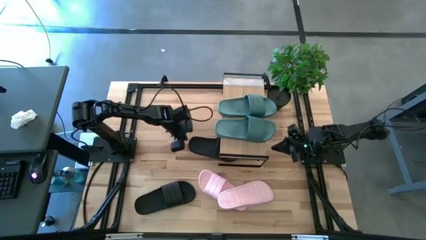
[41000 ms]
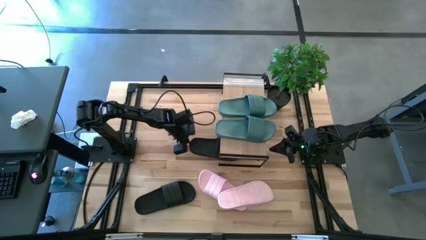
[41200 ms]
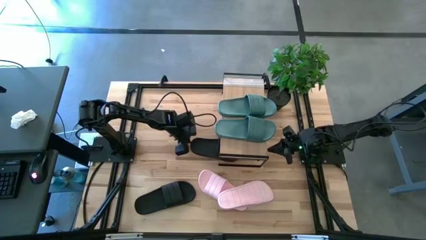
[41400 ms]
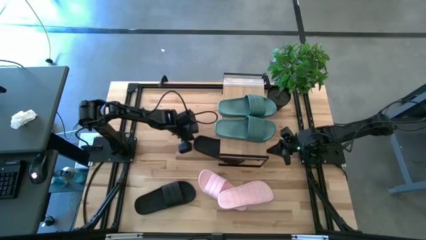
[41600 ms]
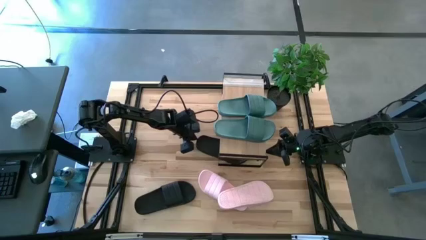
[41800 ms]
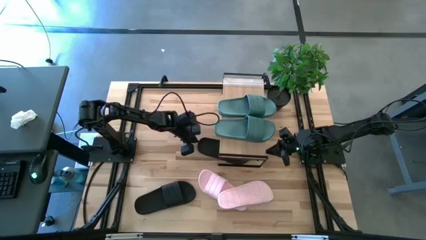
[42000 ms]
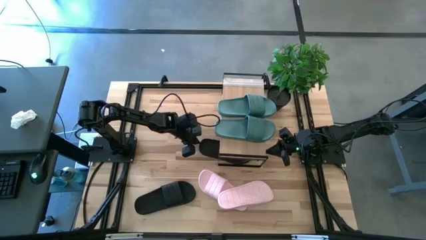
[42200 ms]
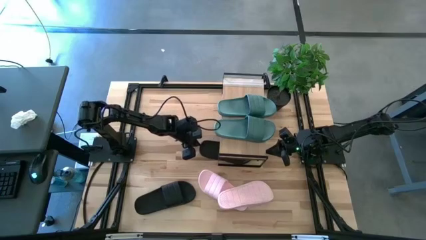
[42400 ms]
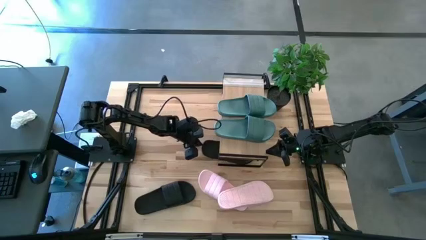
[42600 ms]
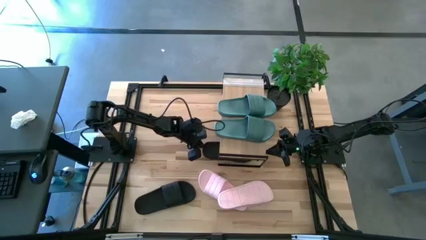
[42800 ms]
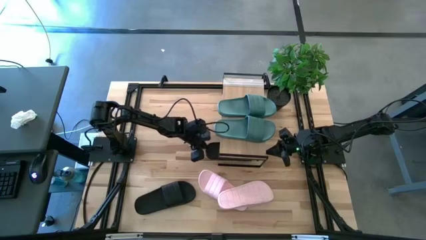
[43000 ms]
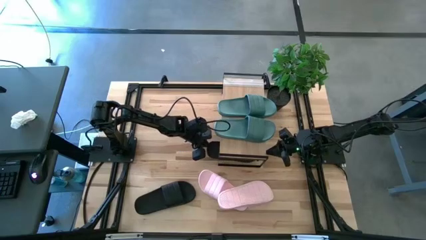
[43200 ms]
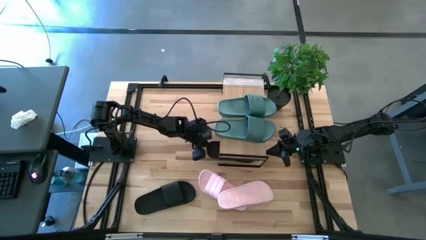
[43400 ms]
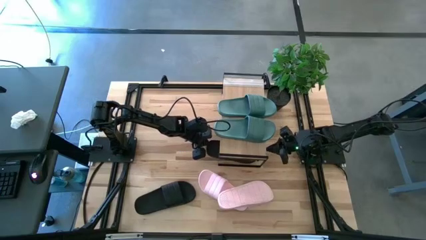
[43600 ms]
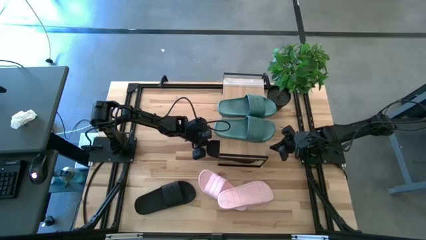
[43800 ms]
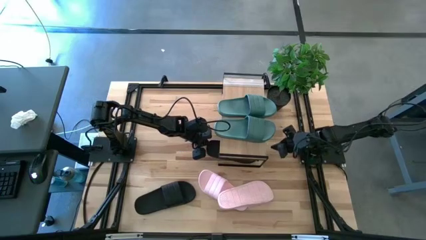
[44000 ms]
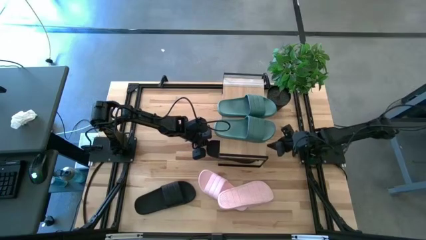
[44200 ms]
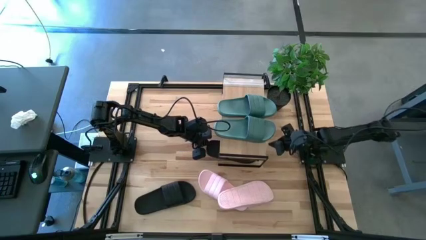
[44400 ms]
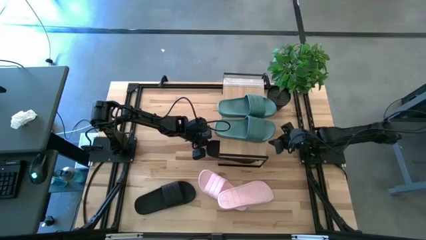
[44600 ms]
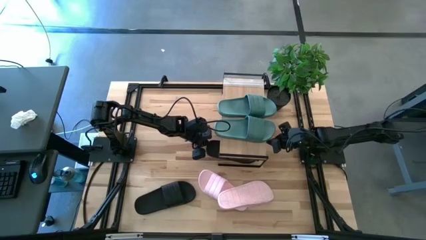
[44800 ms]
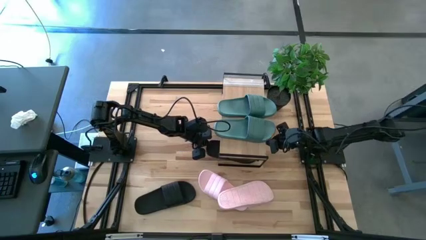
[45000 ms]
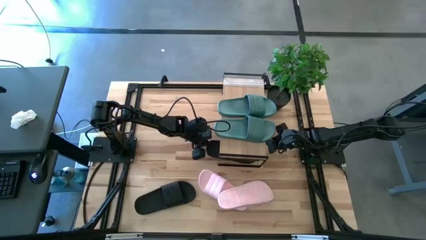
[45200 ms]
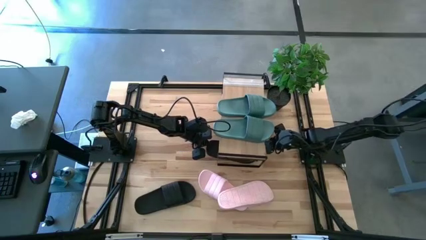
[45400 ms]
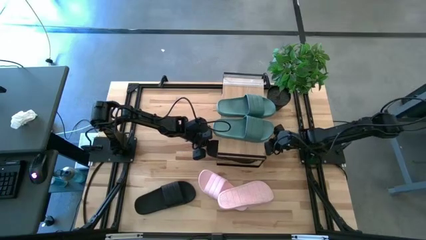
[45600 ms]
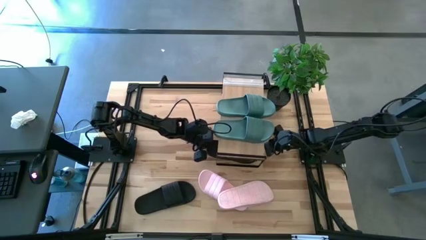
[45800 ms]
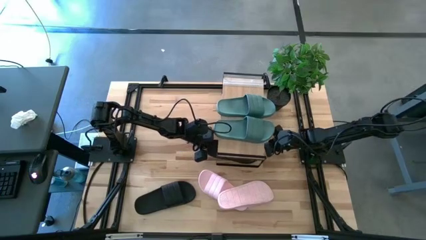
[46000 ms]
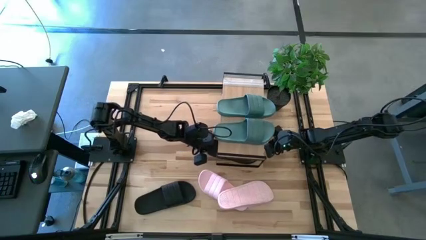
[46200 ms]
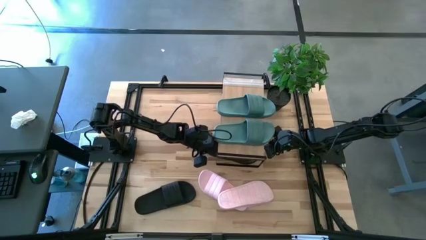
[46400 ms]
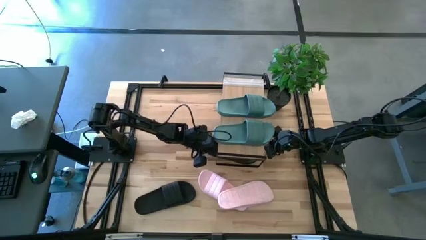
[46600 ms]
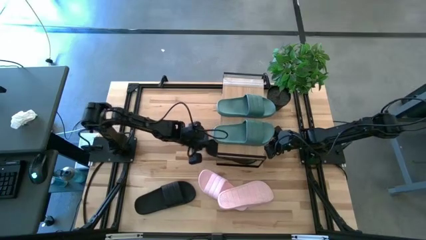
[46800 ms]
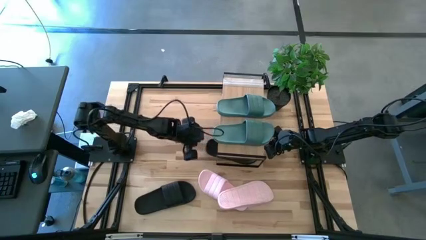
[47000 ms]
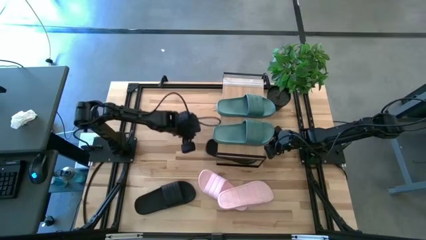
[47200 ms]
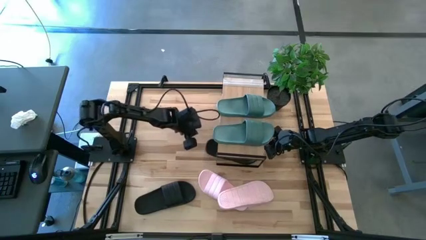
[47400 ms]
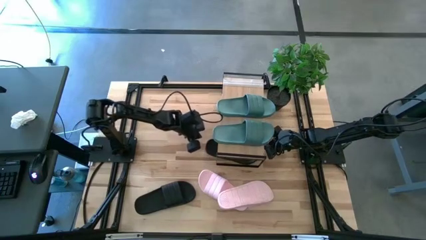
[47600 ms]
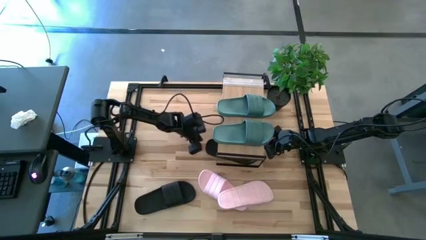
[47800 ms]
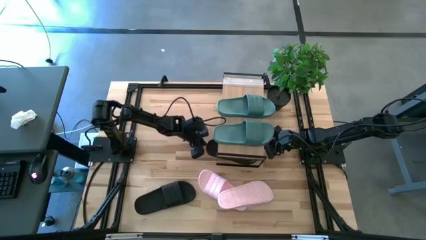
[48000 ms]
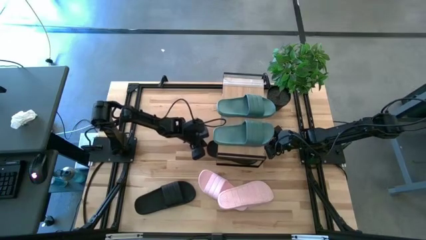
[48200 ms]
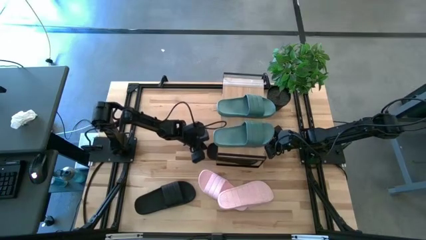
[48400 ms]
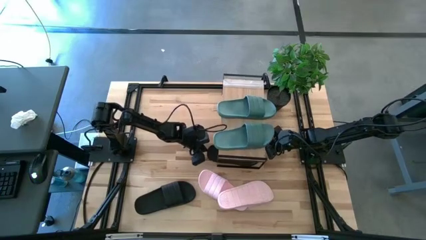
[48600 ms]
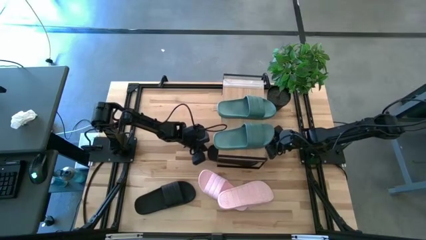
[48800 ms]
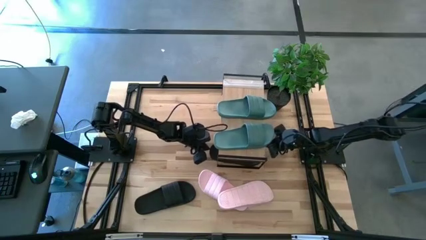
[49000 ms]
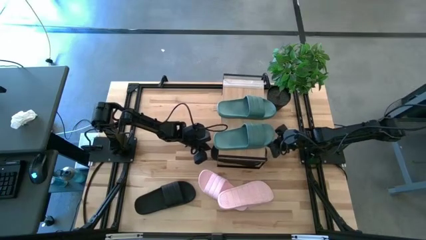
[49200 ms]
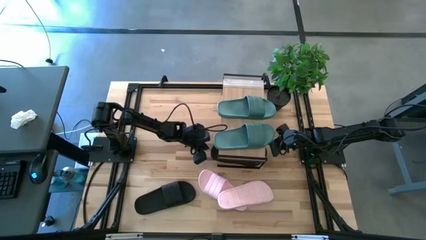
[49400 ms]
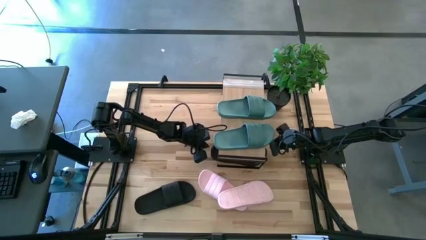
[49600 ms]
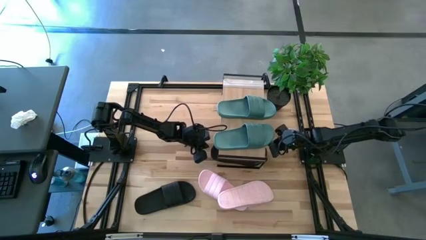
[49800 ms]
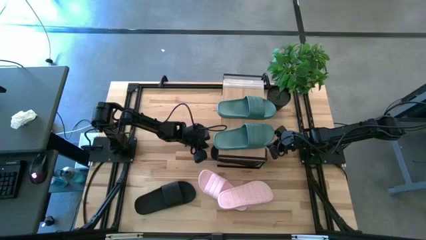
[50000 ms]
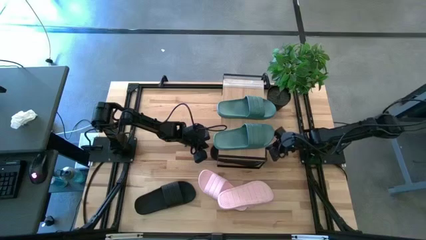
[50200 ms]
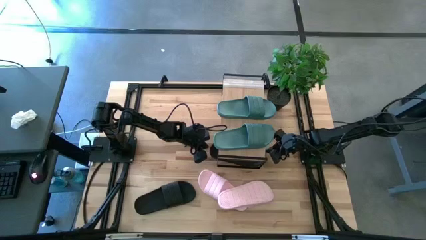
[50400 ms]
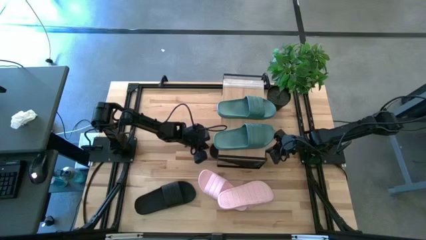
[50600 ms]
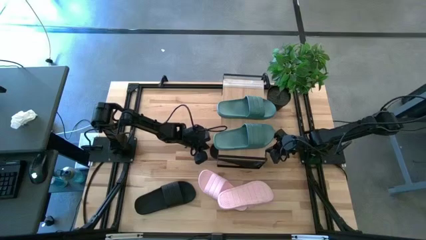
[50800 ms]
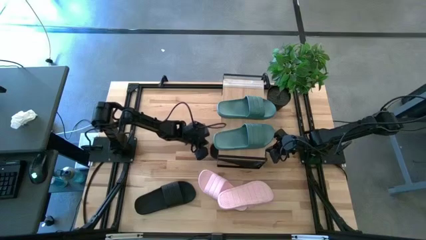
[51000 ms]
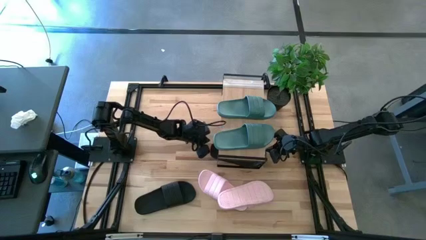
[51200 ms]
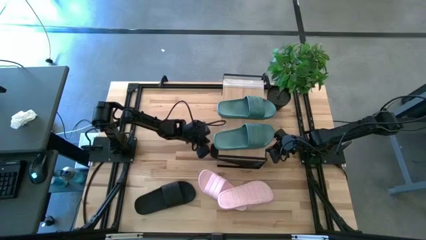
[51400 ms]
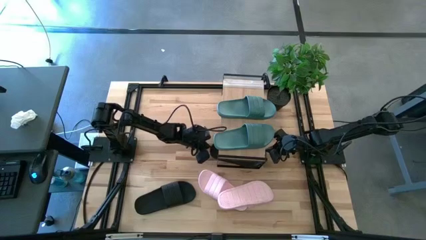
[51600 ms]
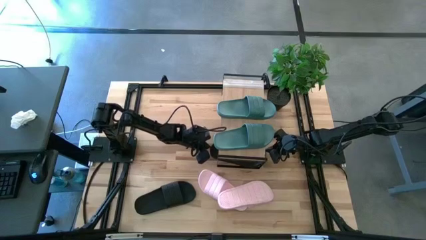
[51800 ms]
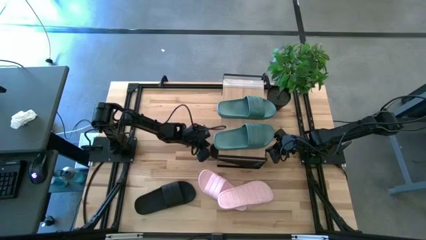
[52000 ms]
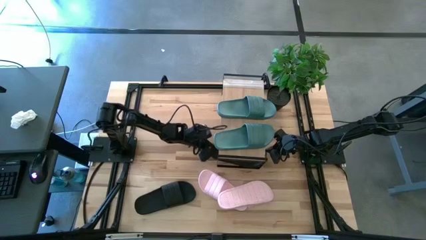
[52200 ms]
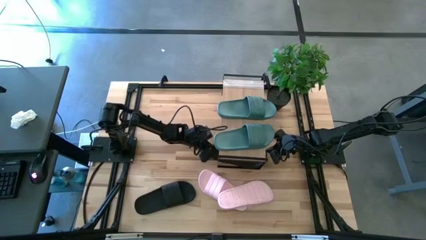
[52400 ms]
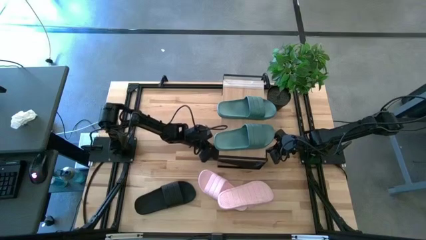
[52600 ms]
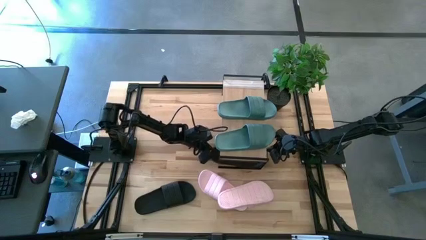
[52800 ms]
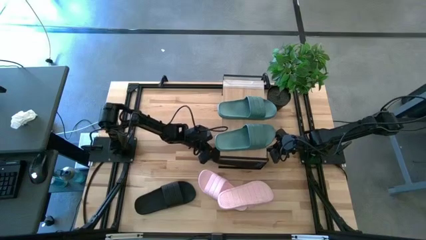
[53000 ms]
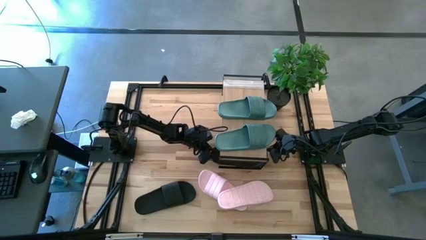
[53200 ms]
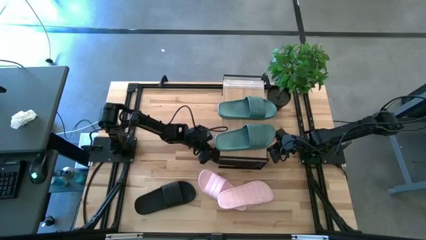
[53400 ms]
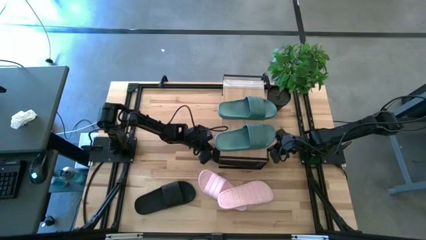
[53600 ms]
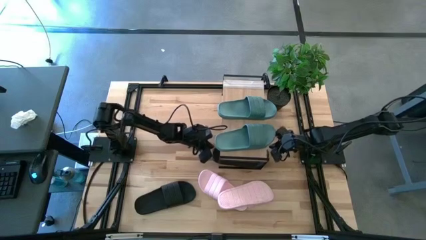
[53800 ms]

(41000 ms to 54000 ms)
Task: Pick and place slides into the shelf
Put the top black slipper under the shelf

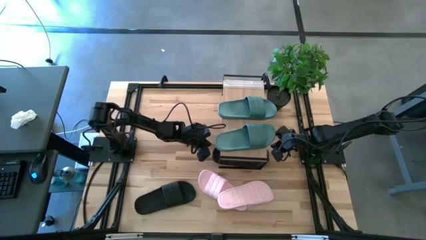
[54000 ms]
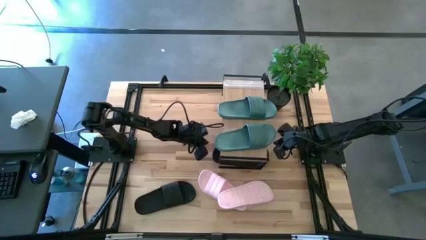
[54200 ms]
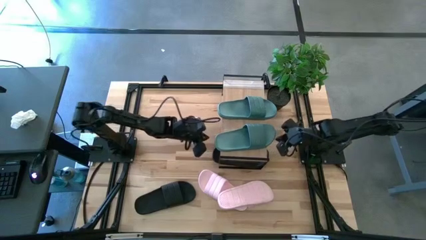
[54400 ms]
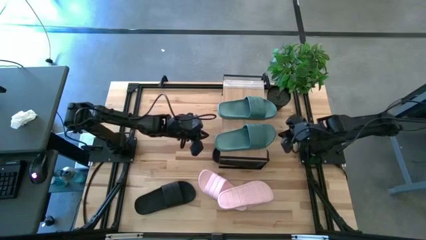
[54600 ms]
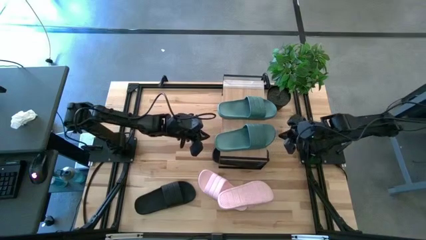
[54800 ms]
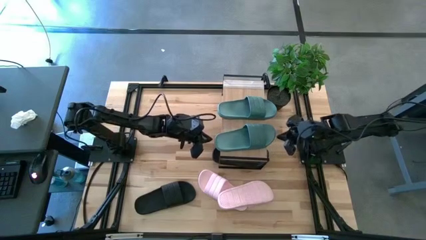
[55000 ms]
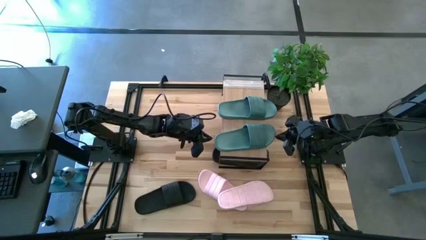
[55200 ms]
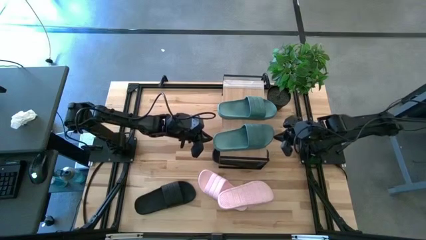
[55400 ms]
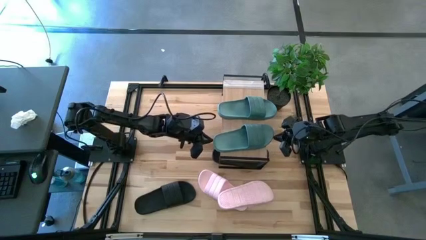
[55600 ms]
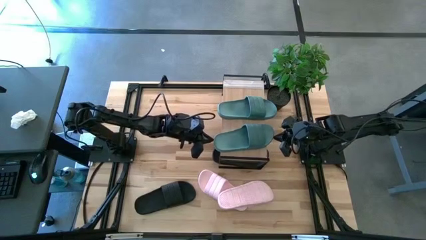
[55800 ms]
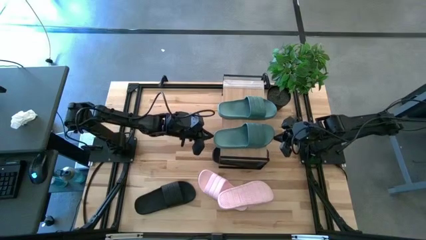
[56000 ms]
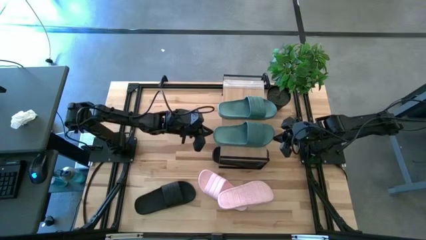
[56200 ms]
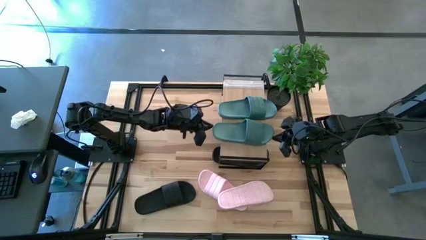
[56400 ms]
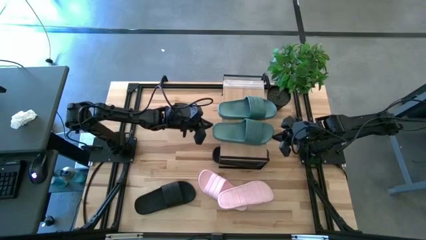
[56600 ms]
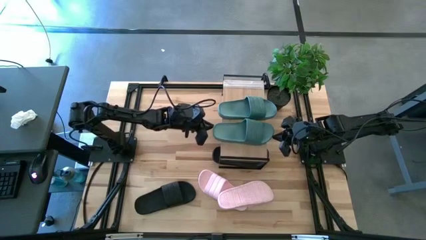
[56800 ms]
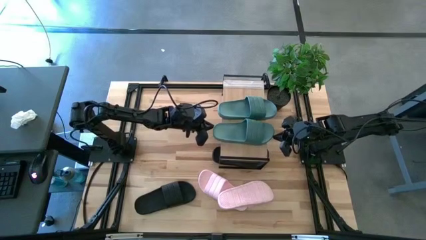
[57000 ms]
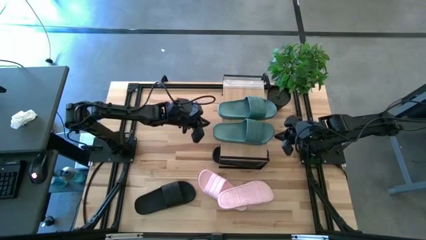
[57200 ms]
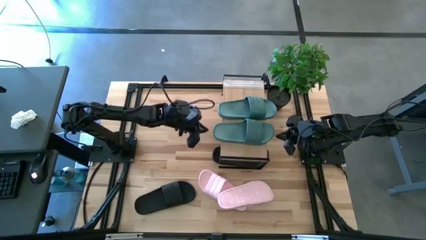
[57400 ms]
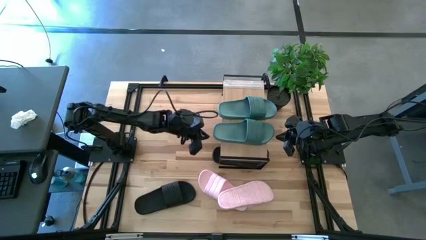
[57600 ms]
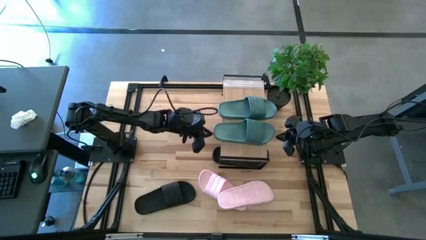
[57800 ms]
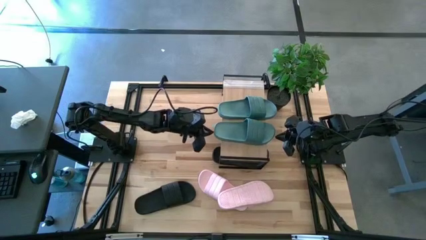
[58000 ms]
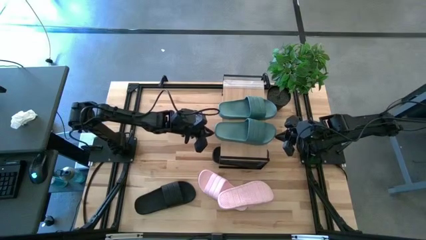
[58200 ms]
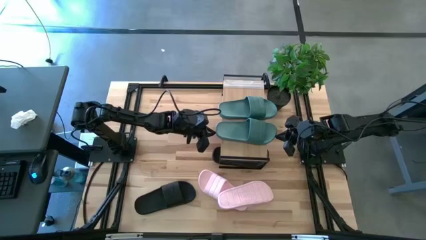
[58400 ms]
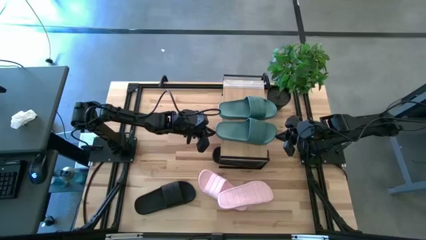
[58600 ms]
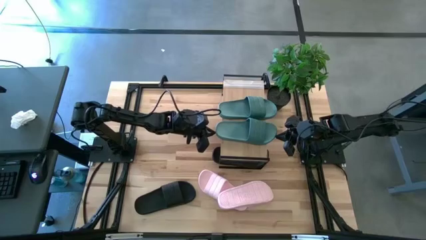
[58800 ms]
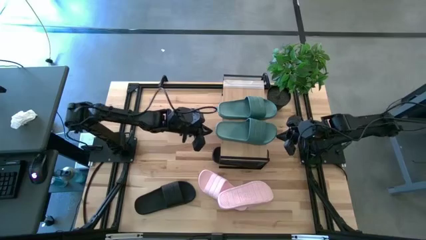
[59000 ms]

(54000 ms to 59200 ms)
Adjust the bottom green slipper on the shelf
